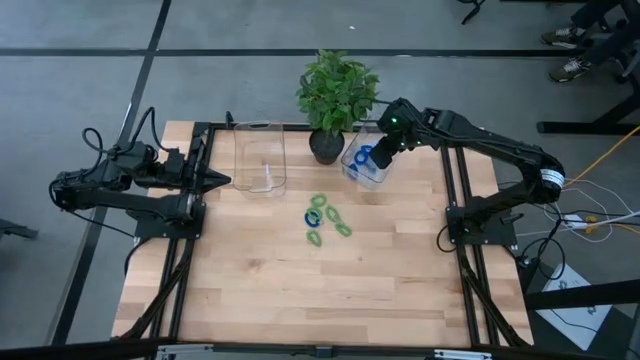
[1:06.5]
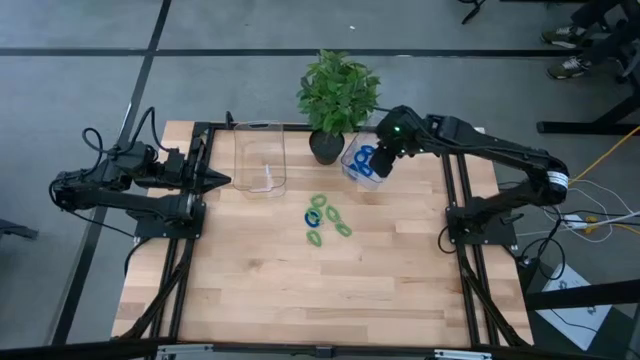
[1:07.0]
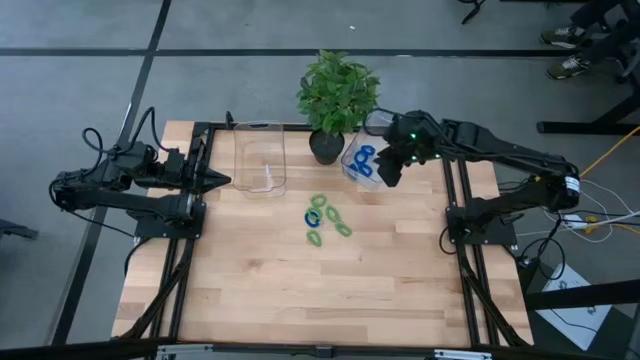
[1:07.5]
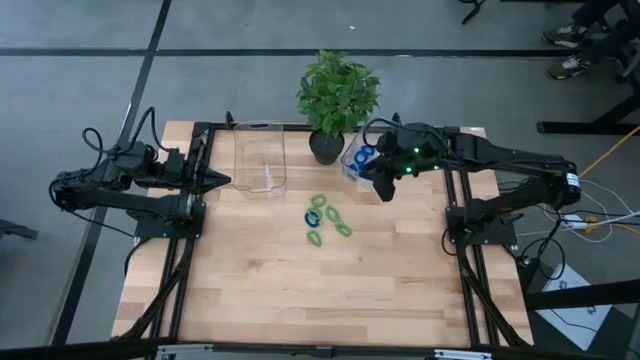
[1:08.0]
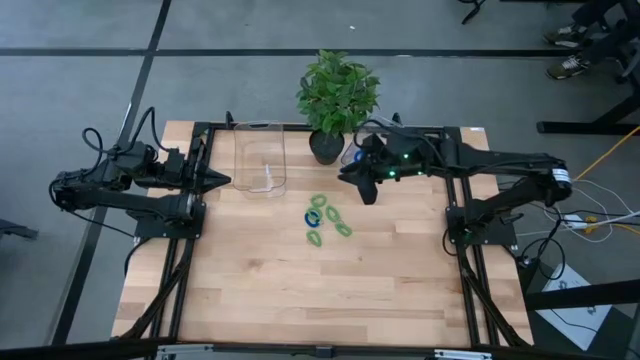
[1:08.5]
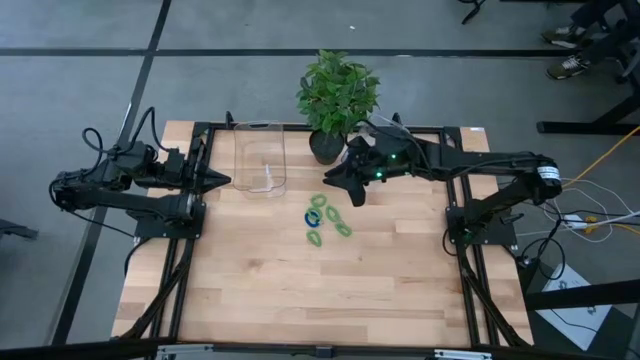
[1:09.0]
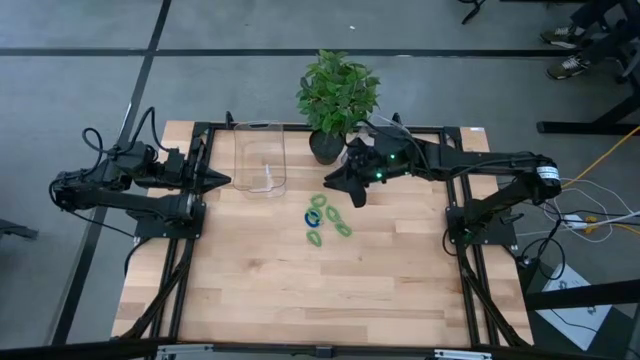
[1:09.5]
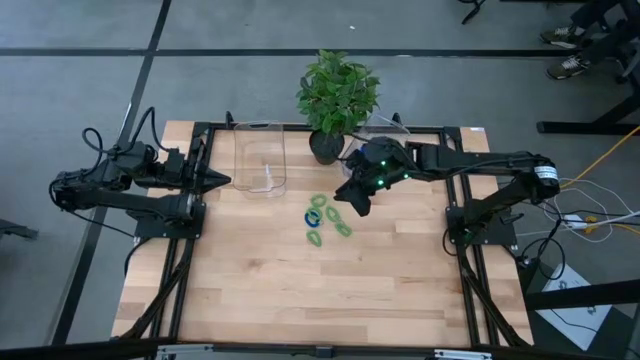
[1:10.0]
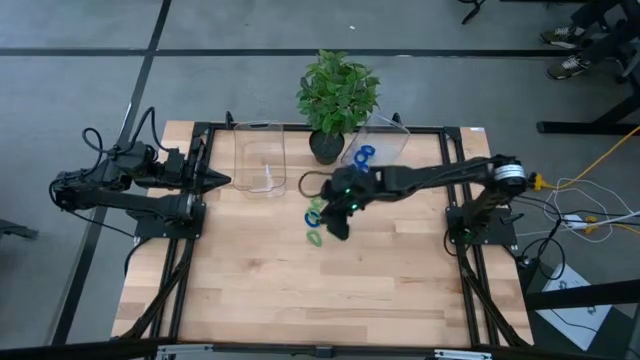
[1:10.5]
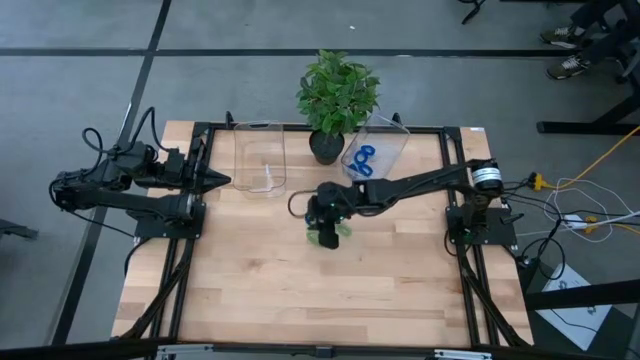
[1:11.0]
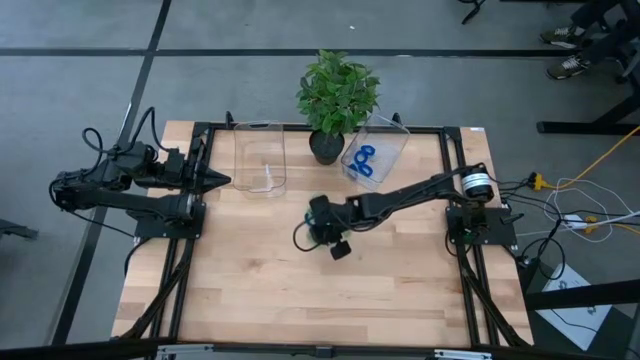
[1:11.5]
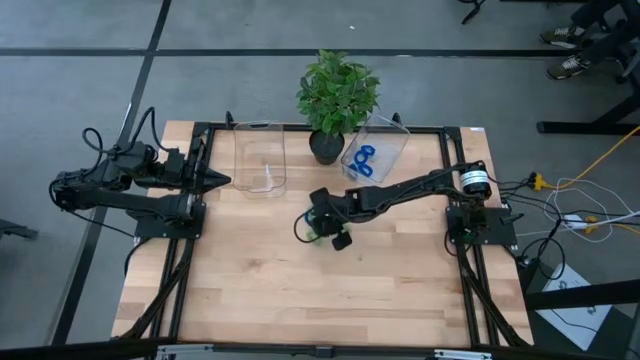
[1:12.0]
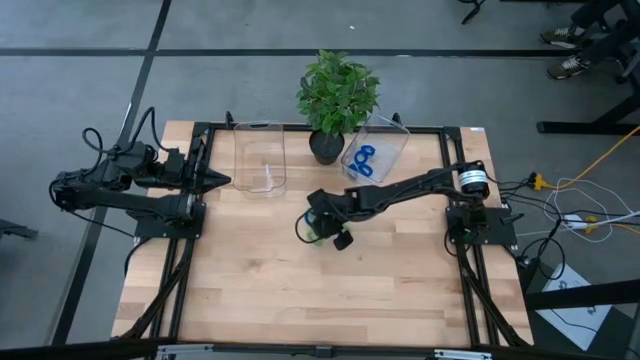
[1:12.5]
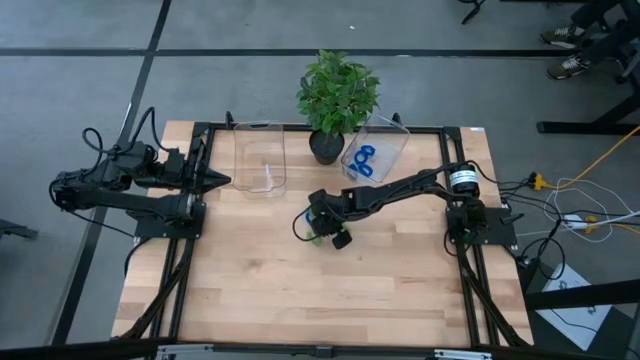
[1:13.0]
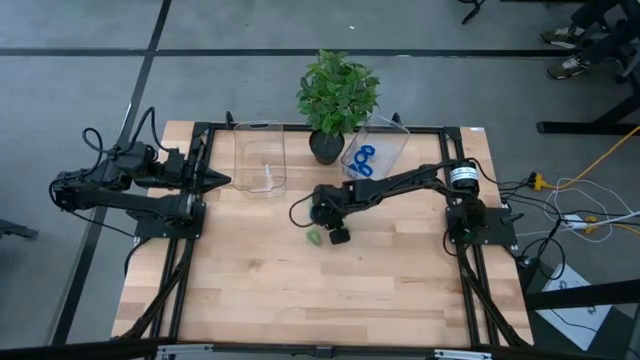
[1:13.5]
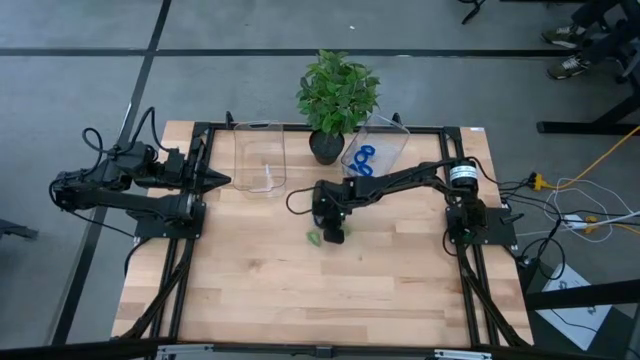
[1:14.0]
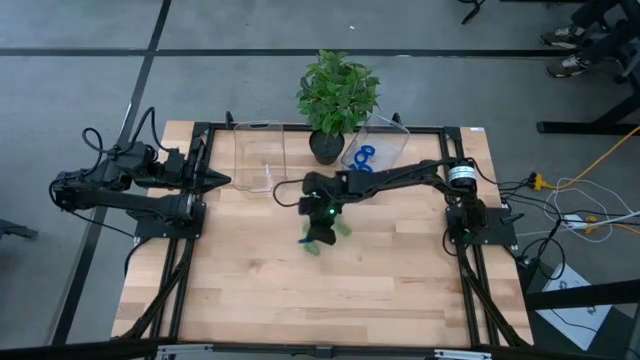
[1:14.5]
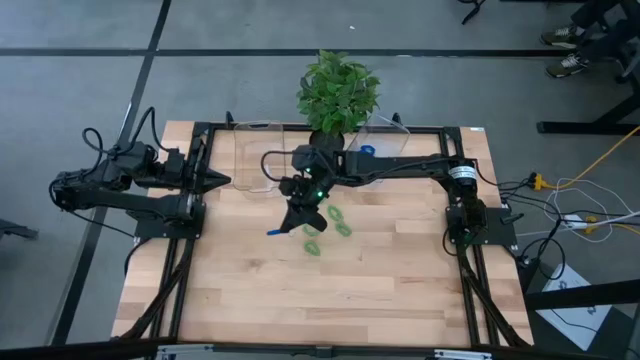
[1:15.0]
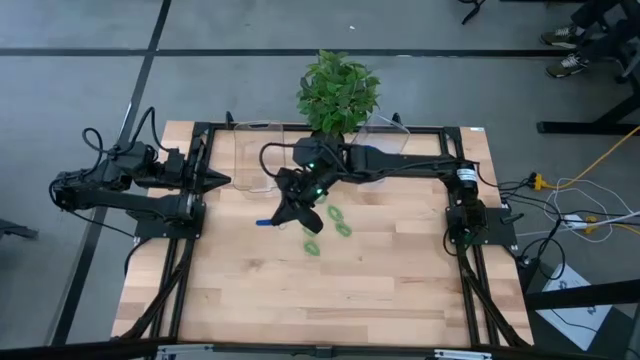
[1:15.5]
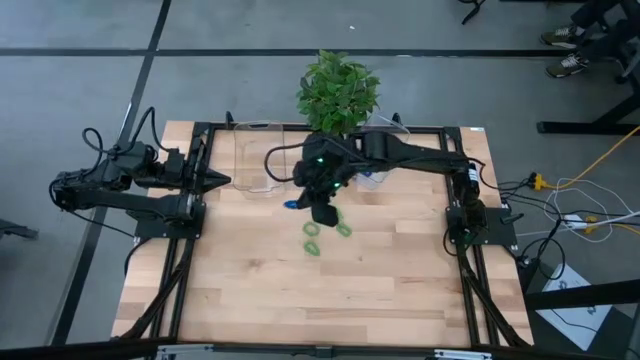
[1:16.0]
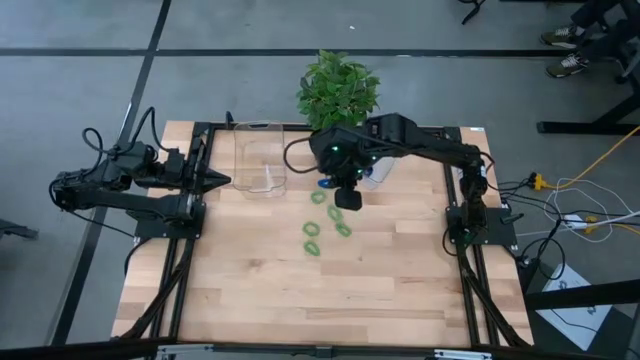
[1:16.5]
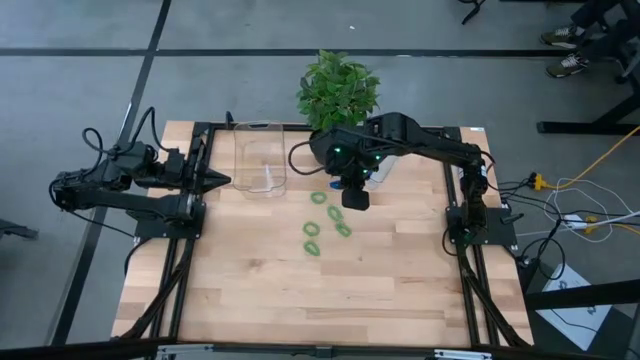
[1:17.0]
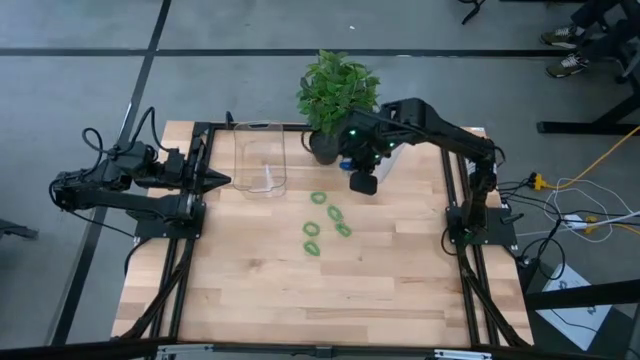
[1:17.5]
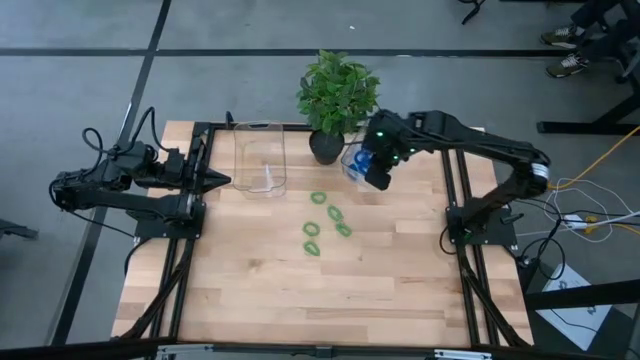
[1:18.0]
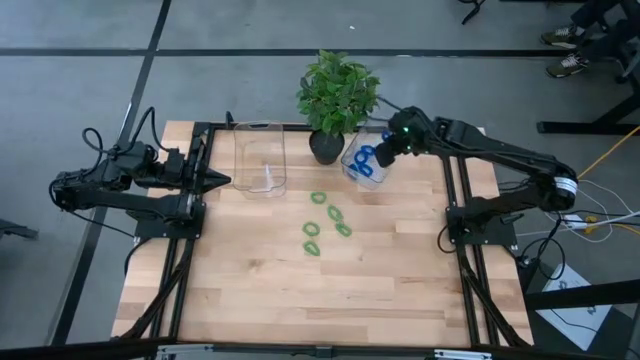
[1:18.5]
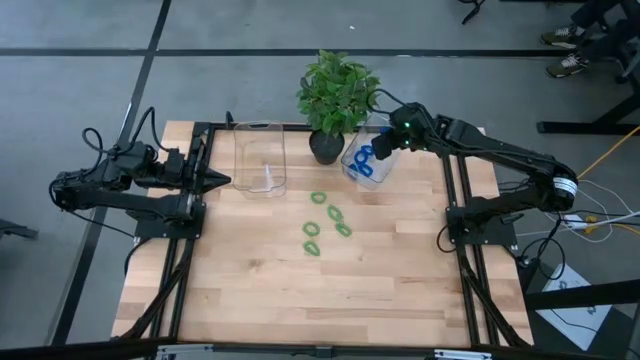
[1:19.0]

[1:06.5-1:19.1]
Task: Sort spring keychains
Put the blue spring keychain into the right transparent bin

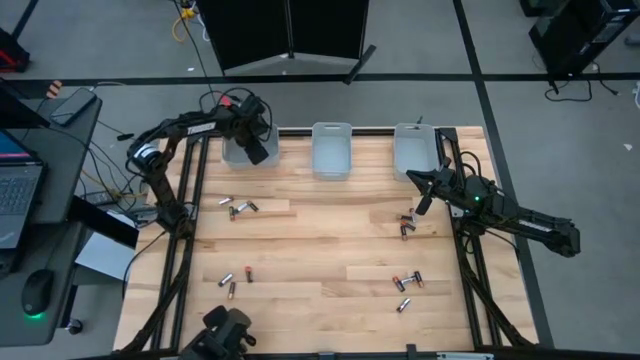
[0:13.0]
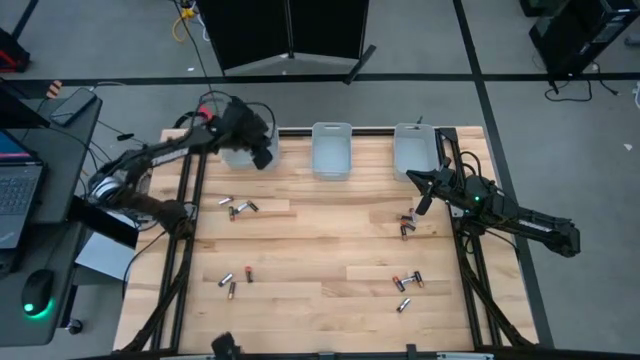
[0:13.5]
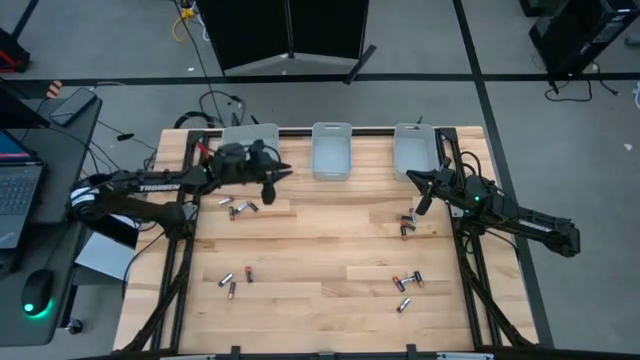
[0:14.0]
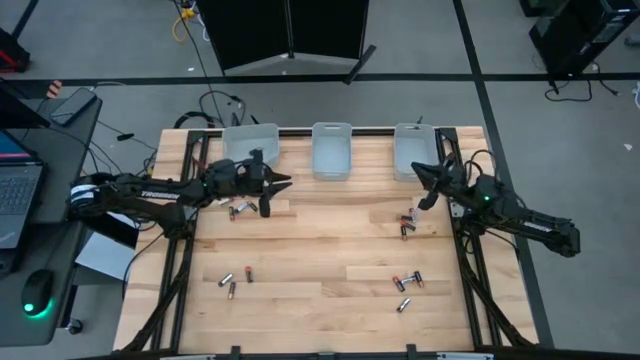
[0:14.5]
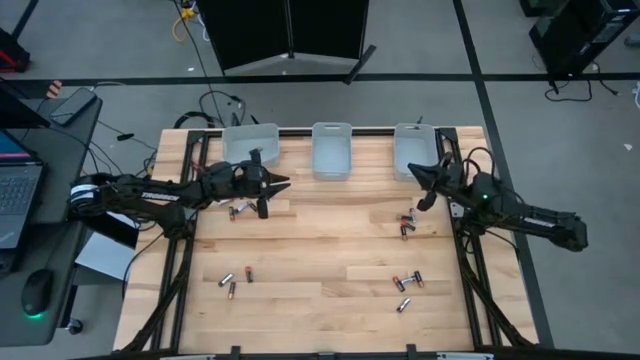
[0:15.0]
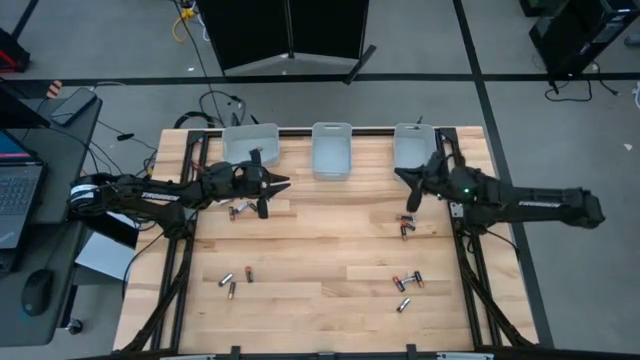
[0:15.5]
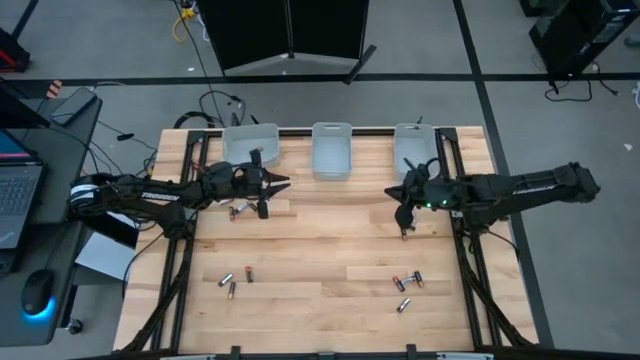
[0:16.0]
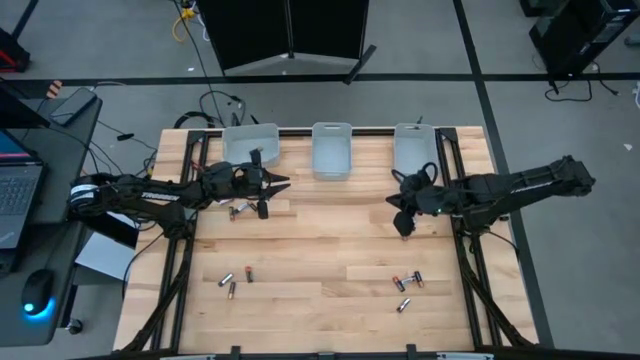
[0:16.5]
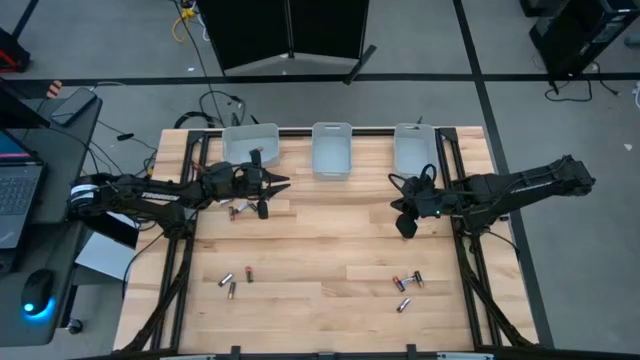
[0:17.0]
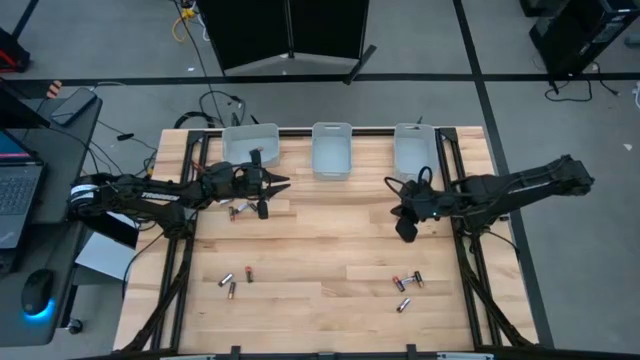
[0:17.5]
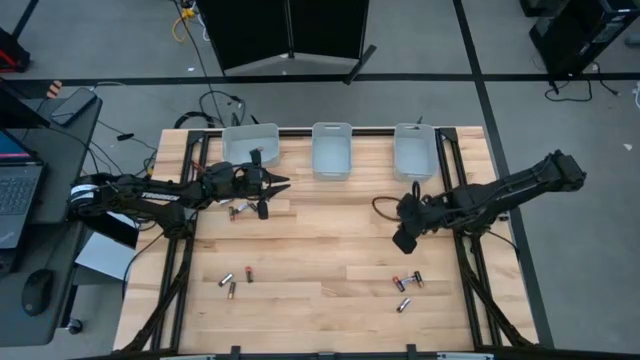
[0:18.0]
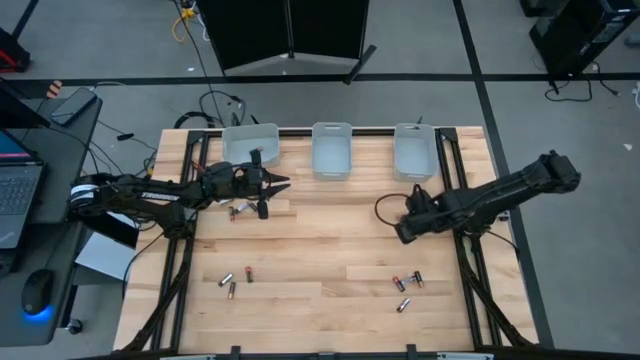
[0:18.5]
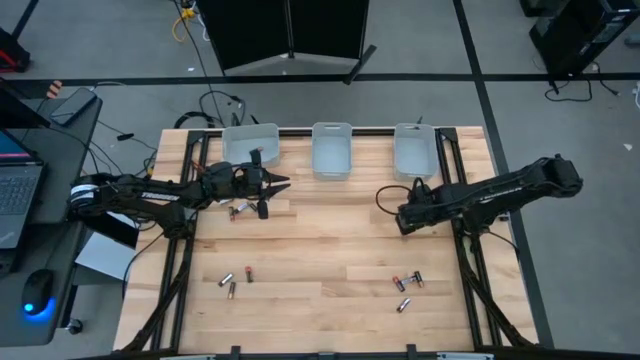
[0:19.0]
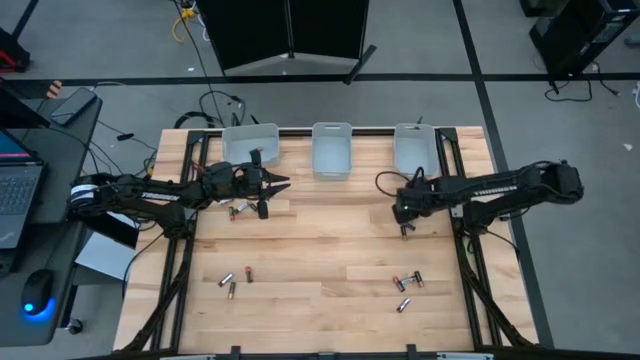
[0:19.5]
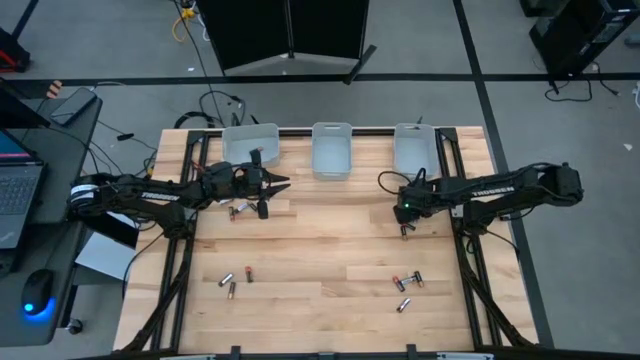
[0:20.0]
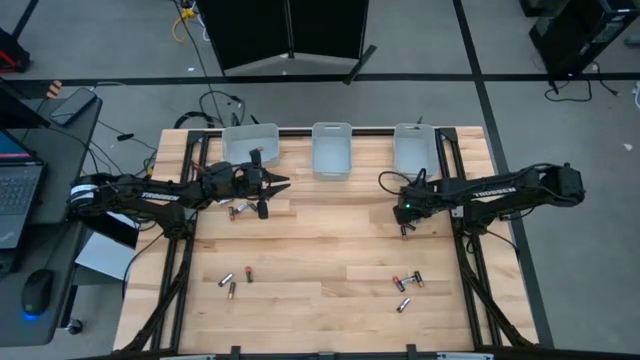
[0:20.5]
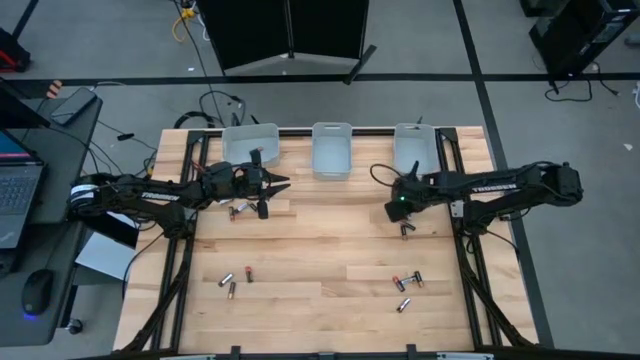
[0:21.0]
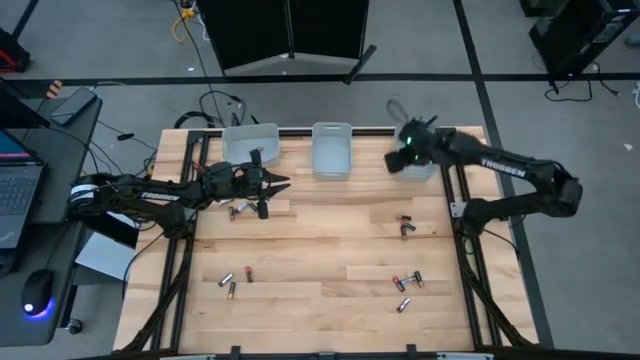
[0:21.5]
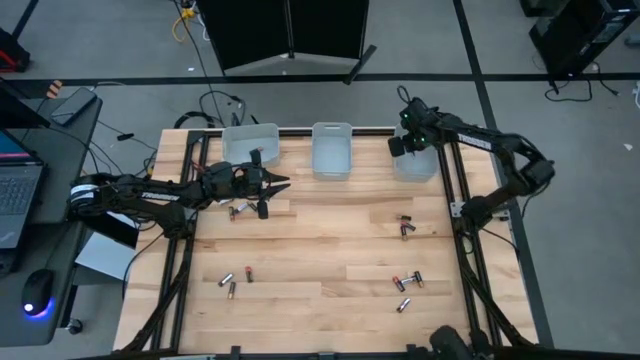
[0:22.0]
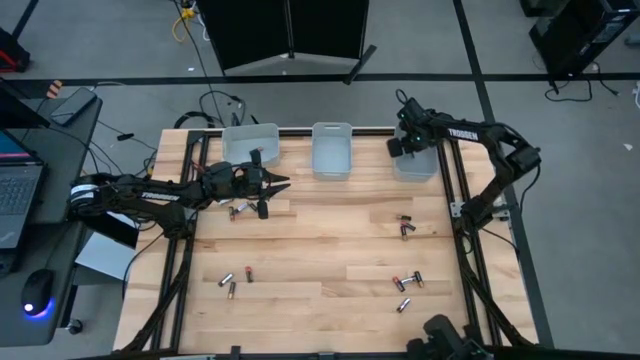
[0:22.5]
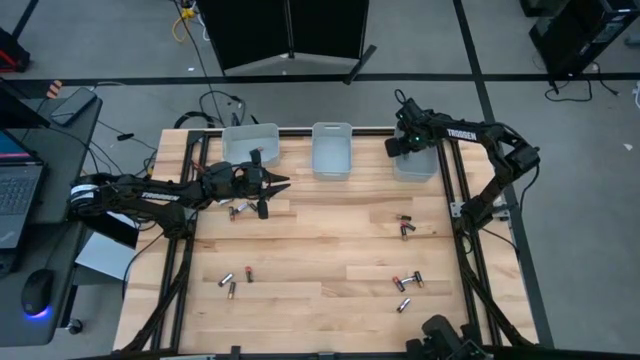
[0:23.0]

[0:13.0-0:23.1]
Task: Sort batteries
Put the black silver battery into the right bin
